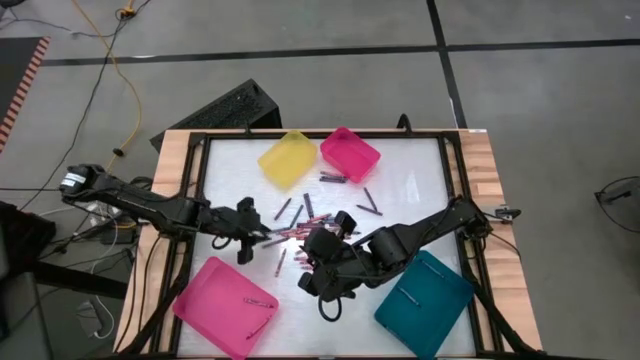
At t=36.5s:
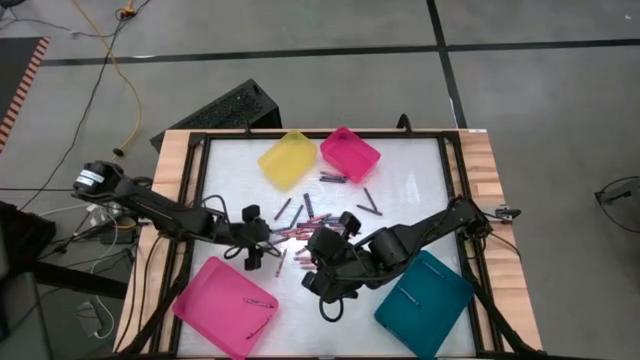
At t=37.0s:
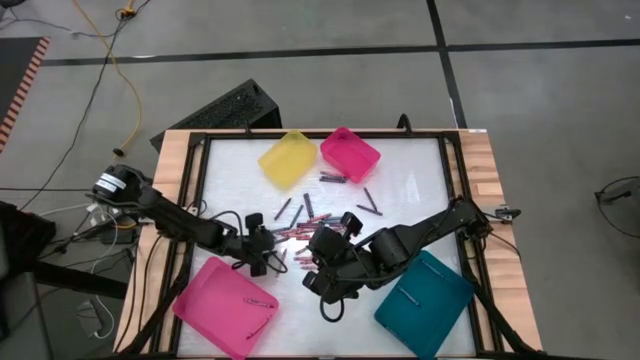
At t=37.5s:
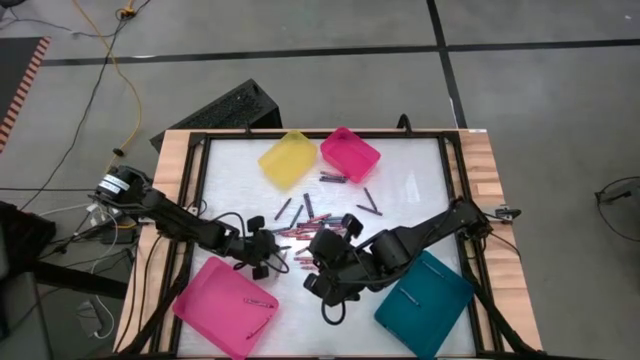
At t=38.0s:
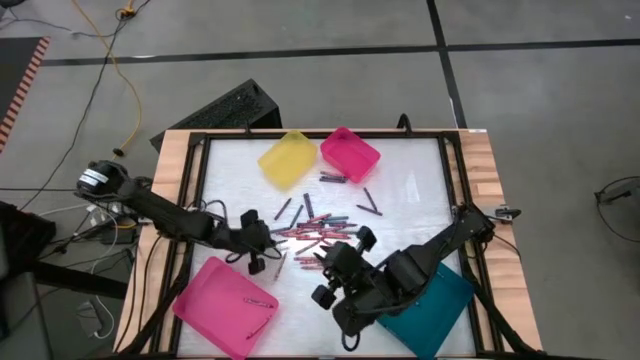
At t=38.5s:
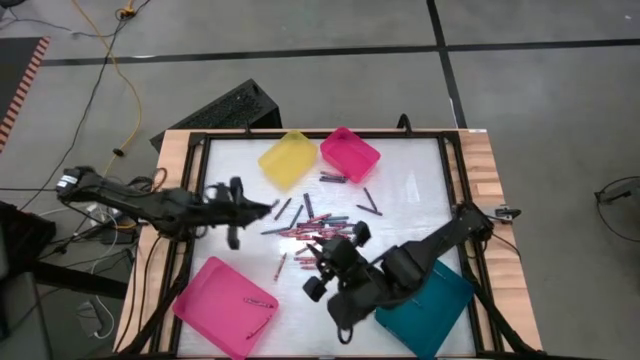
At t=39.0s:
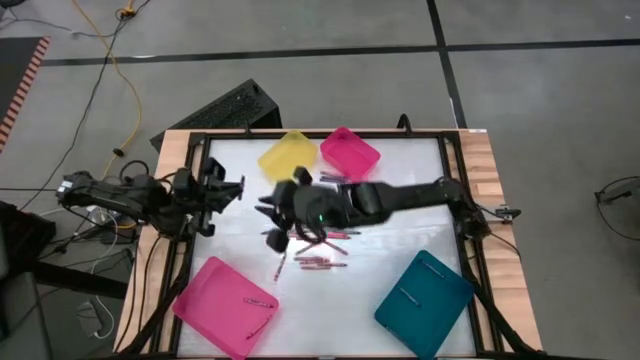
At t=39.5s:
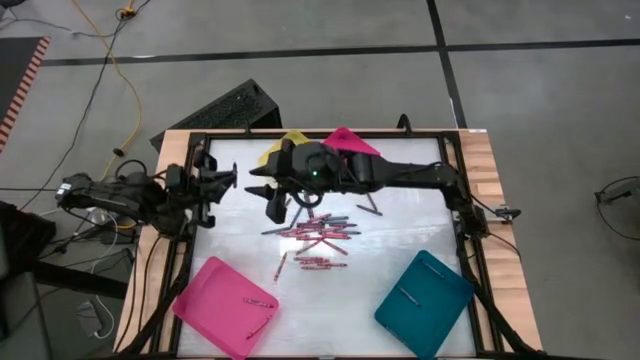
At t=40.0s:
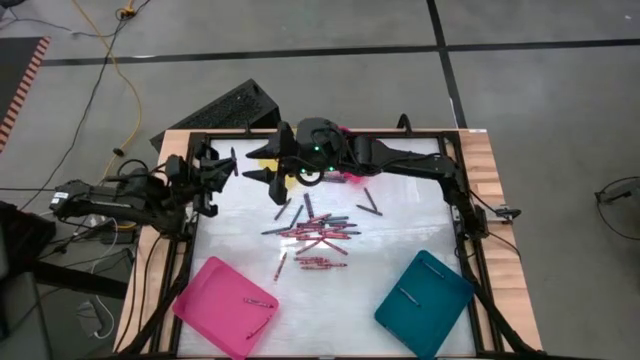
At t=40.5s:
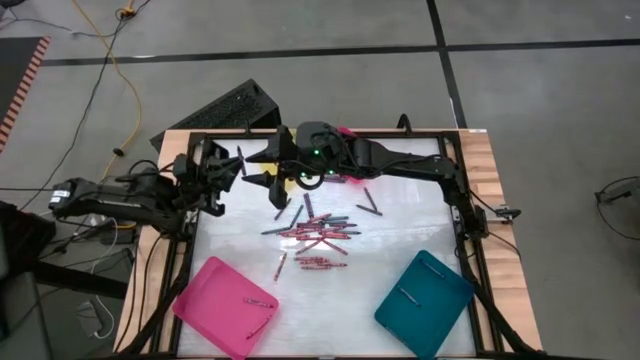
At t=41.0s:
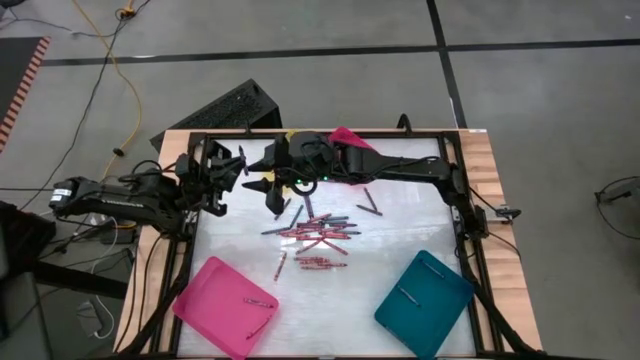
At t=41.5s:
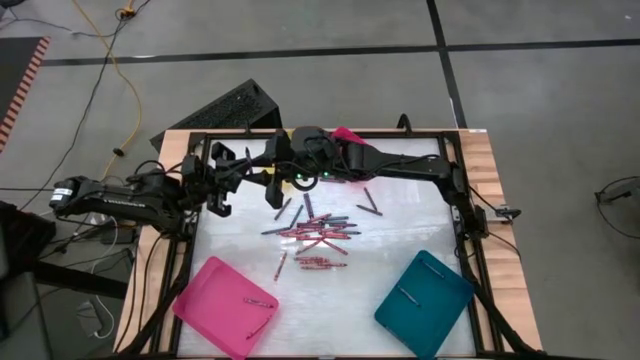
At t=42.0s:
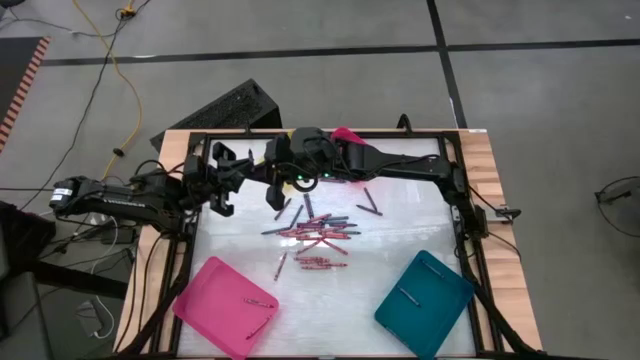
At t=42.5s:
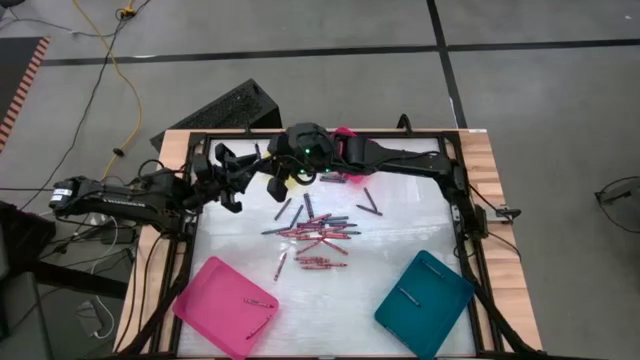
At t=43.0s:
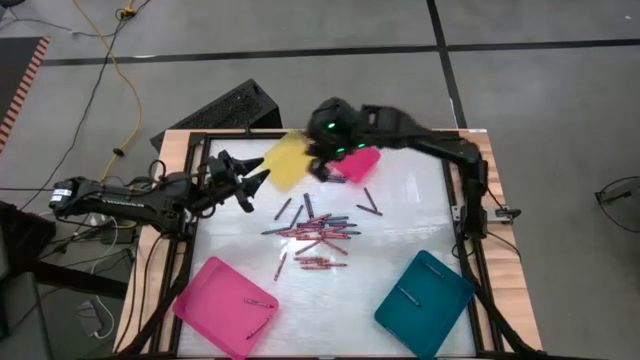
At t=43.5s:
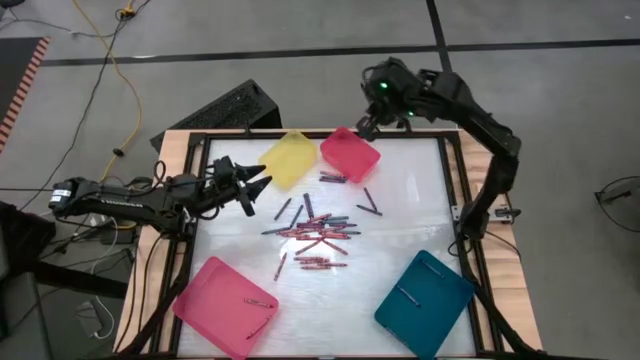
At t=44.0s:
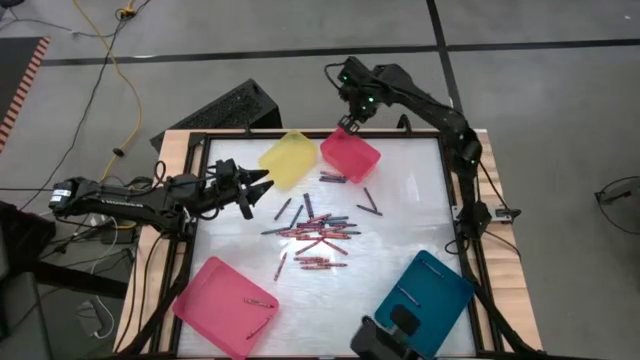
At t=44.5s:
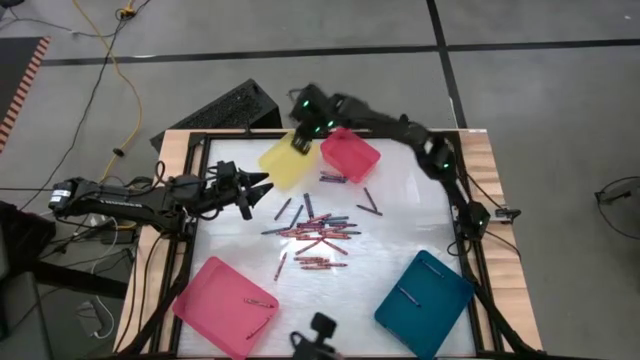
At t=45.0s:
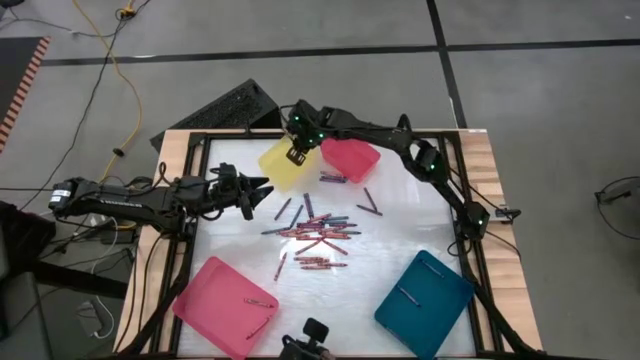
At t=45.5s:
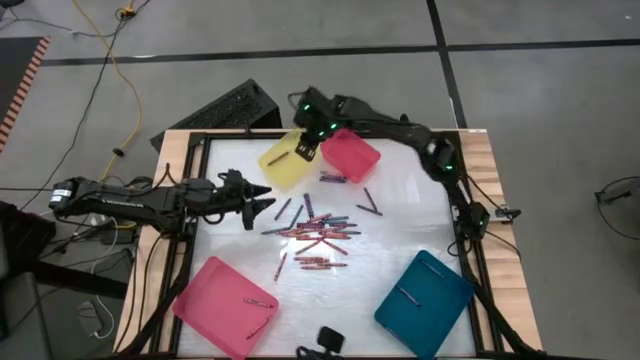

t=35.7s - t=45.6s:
Task: Sort crayons
Put the purple crayon into the yellow bin

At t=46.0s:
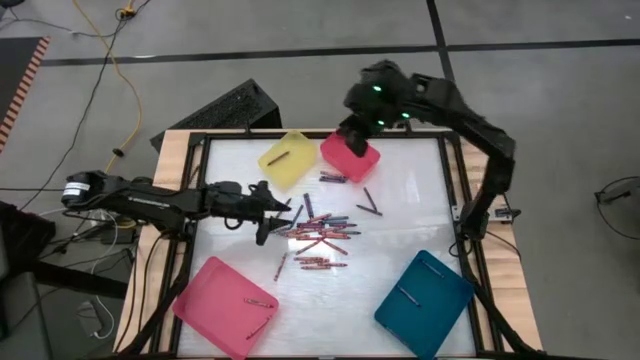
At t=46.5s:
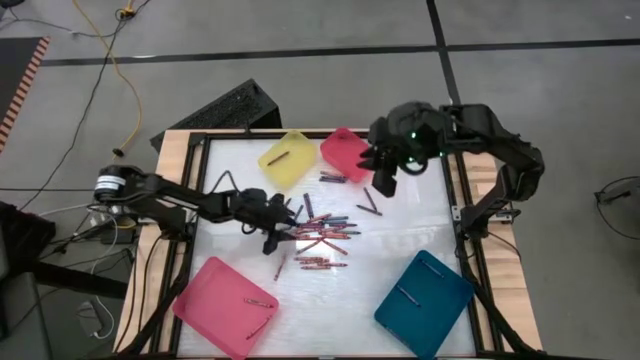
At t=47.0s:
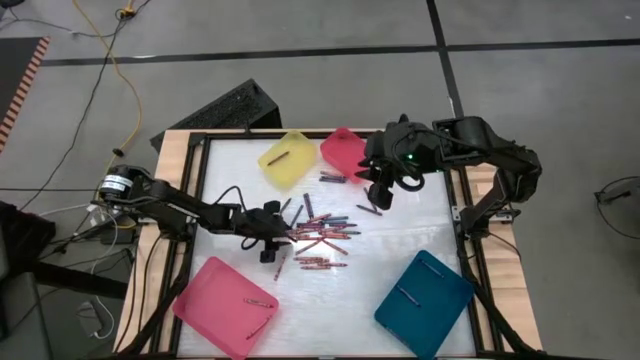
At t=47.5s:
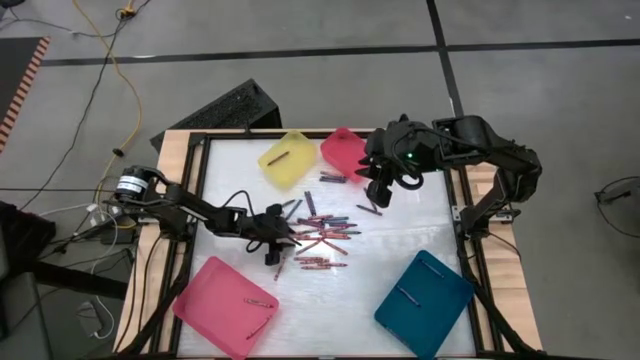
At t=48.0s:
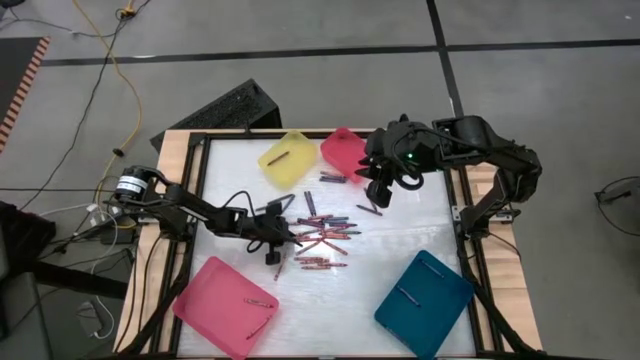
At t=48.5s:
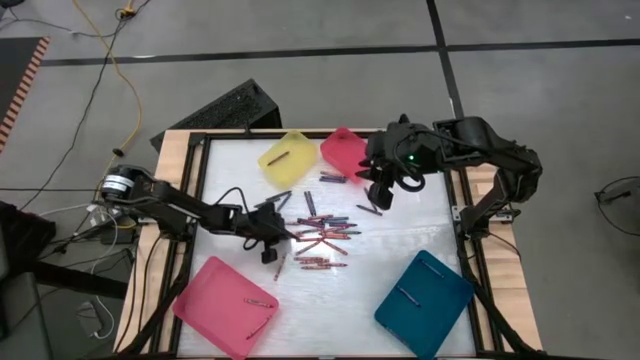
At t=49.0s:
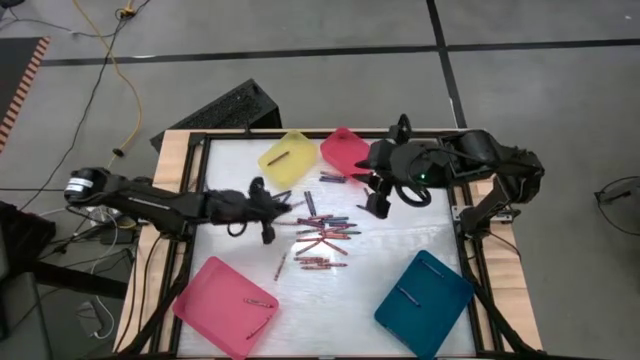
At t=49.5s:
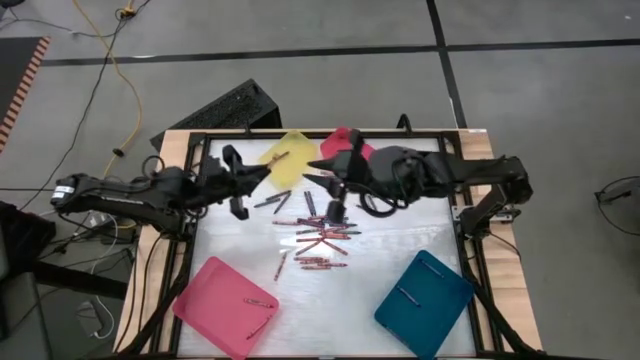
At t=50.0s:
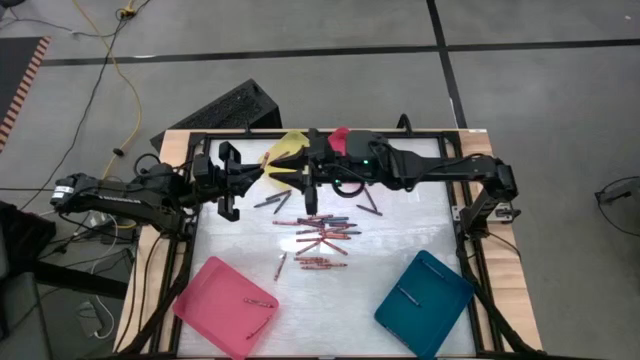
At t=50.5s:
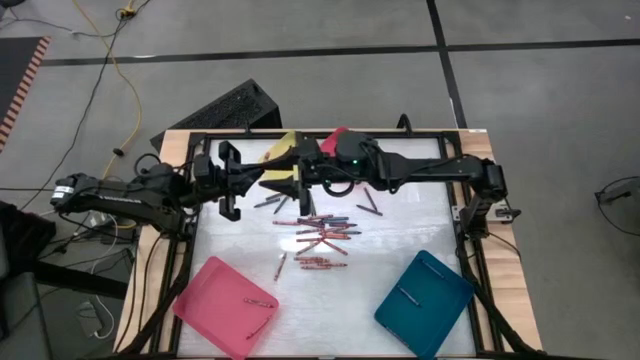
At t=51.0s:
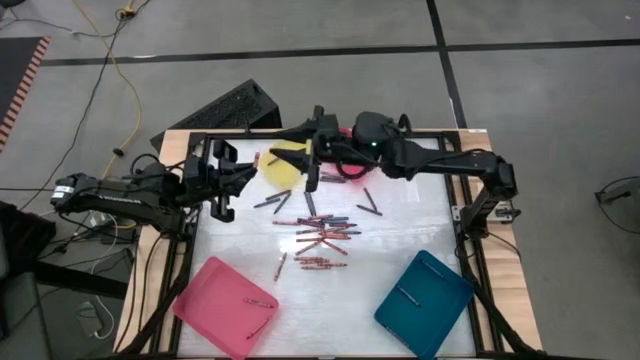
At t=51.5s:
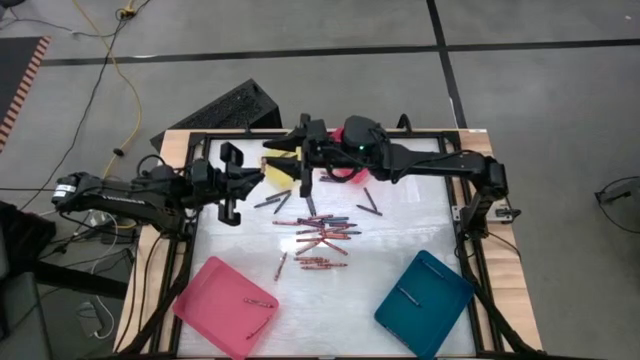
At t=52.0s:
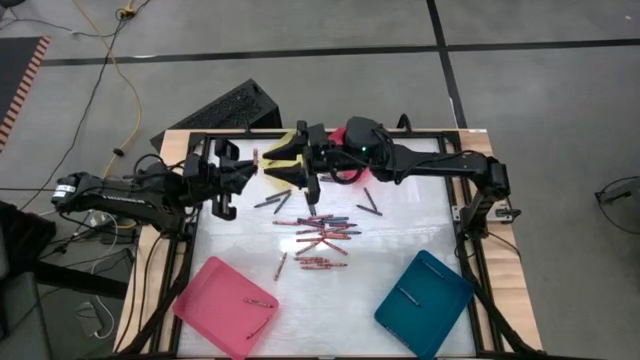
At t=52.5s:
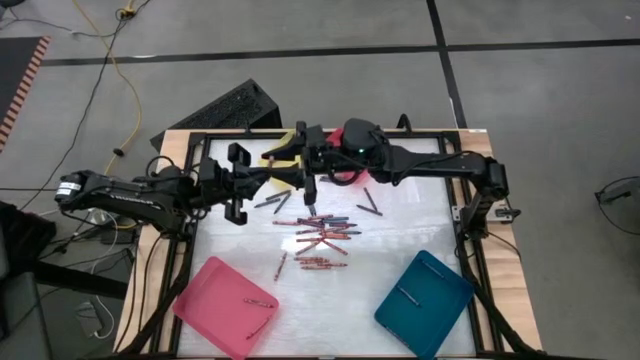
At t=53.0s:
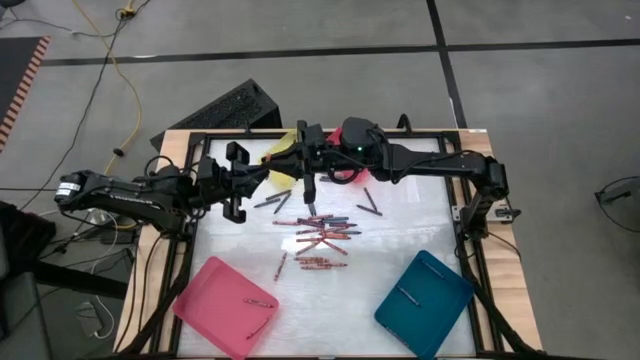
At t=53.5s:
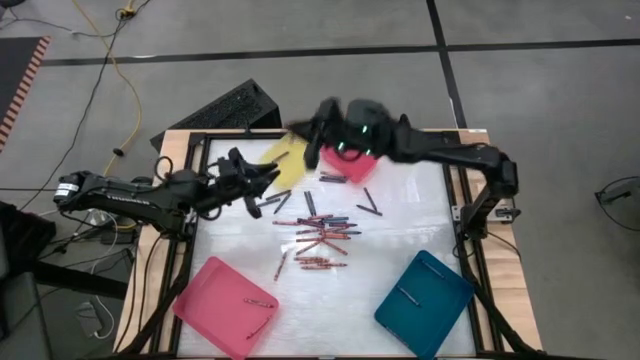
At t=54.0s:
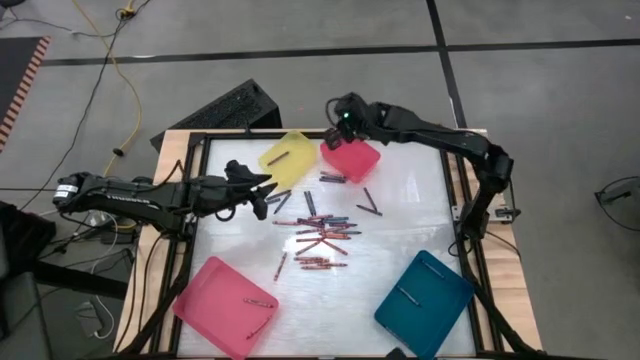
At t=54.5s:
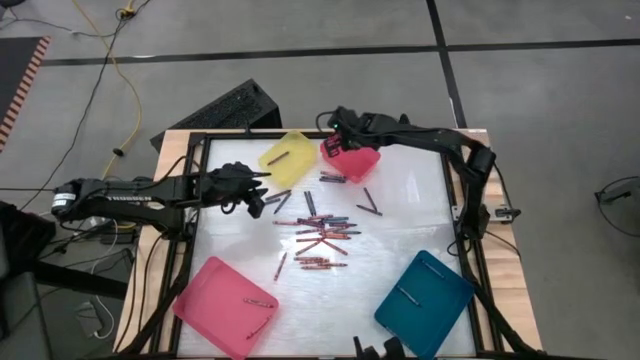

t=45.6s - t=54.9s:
Put the pink crayon into the red bin

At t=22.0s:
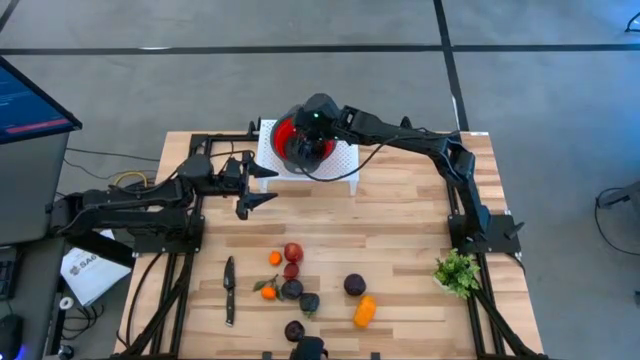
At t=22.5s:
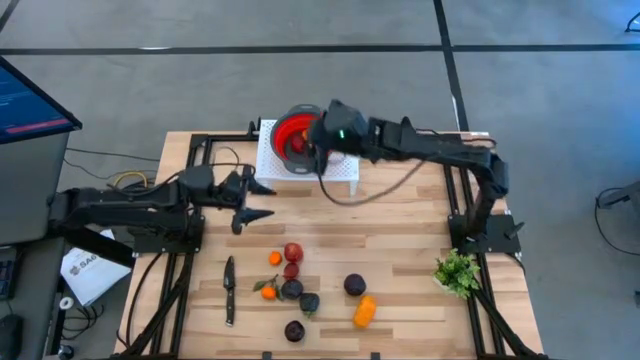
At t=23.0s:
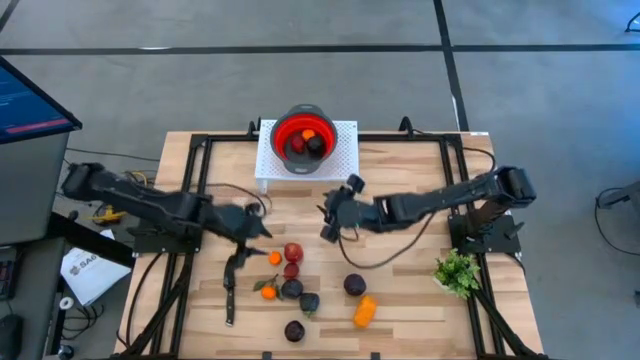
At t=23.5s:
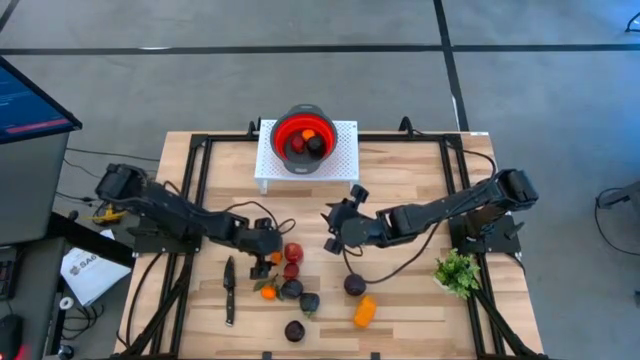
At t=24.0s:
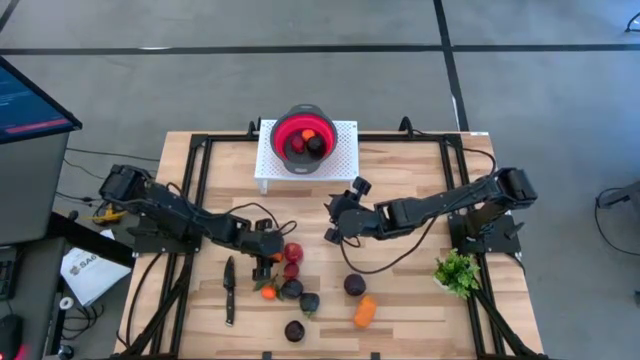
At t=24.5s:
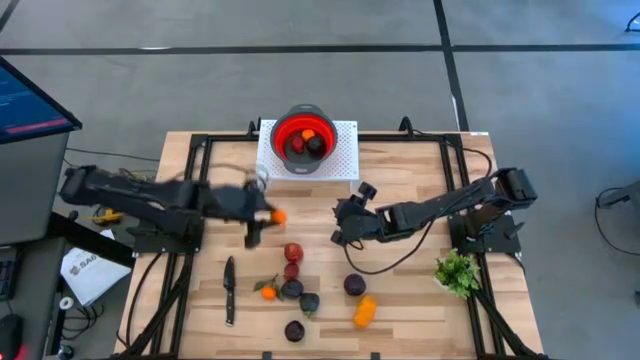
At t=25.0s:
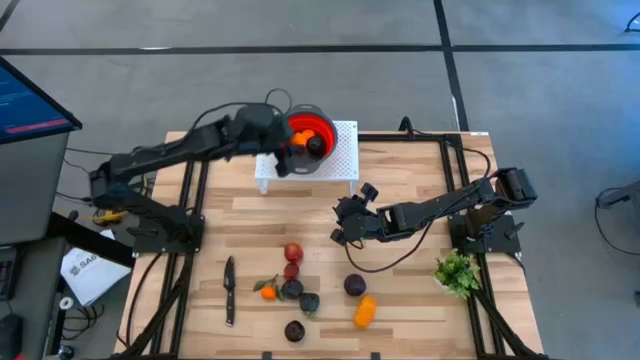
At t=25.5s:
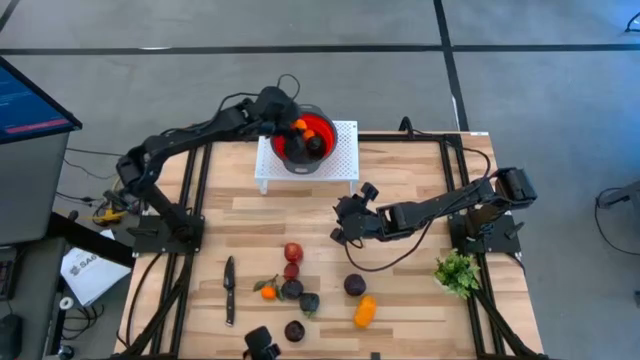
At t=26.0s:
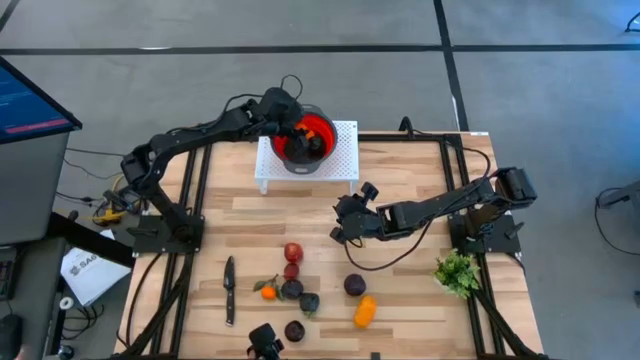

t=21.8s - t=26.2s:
Task: Pick & Place Fruit
Put the orange into the red strainer bowl
